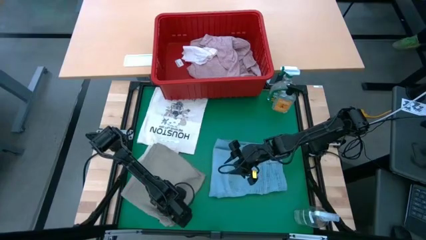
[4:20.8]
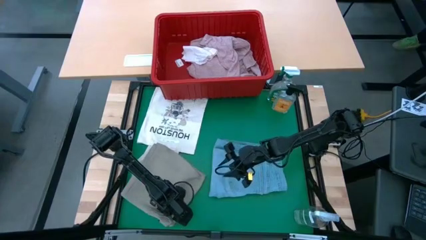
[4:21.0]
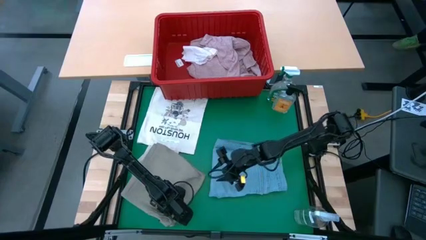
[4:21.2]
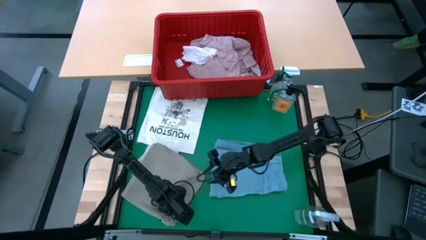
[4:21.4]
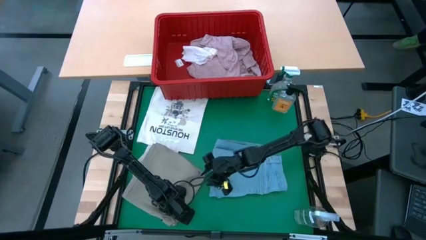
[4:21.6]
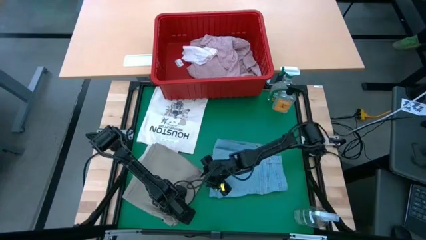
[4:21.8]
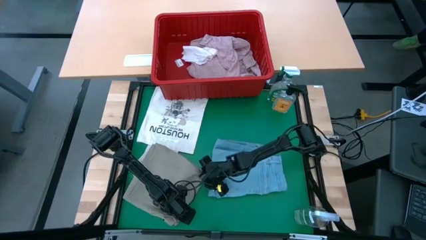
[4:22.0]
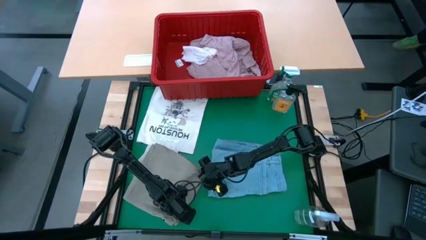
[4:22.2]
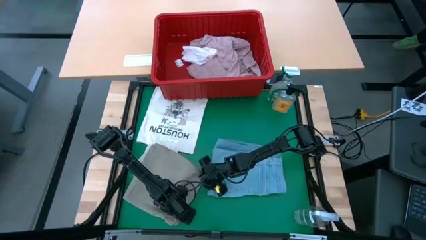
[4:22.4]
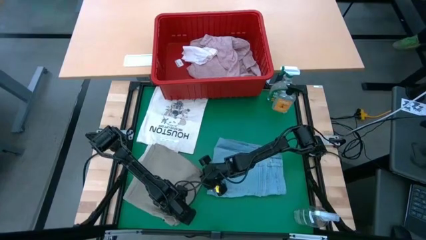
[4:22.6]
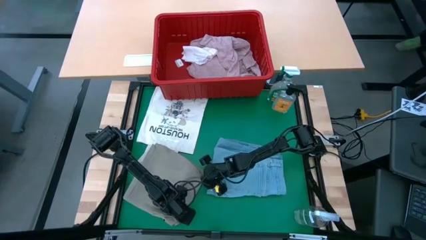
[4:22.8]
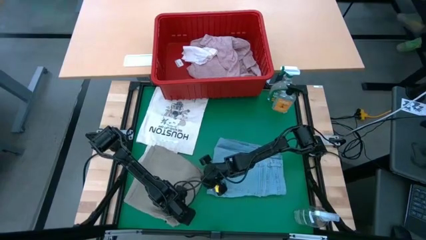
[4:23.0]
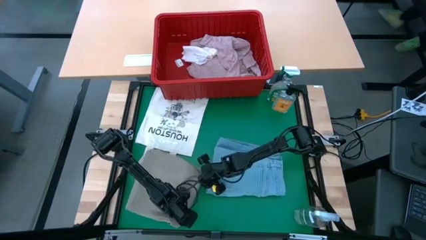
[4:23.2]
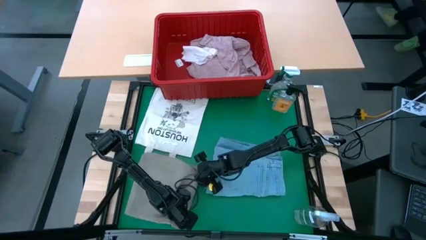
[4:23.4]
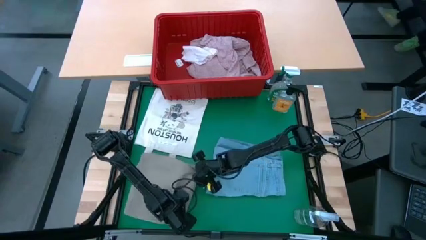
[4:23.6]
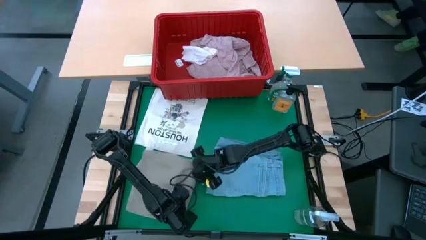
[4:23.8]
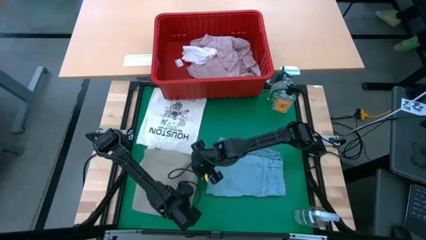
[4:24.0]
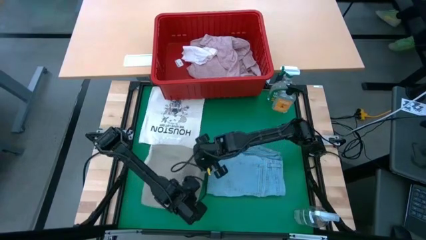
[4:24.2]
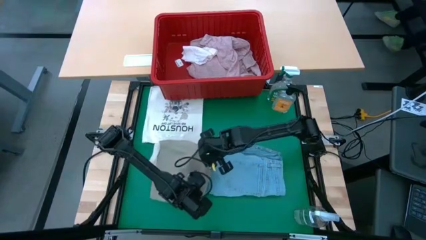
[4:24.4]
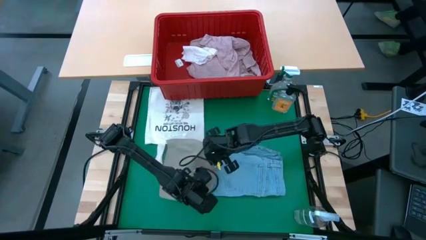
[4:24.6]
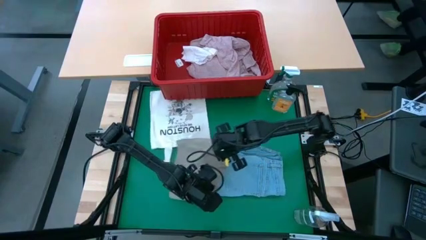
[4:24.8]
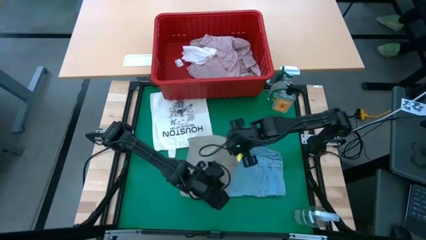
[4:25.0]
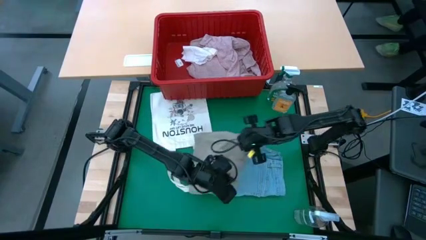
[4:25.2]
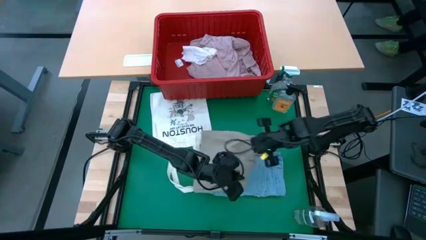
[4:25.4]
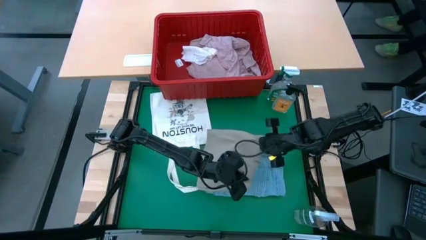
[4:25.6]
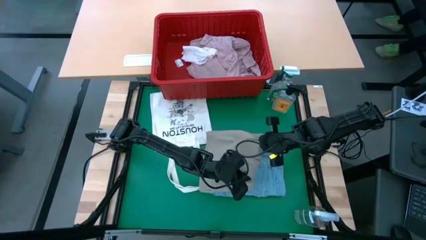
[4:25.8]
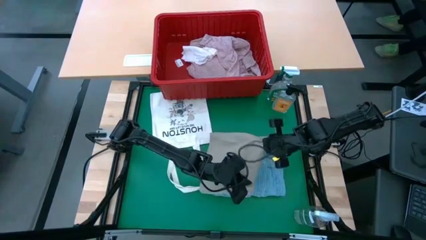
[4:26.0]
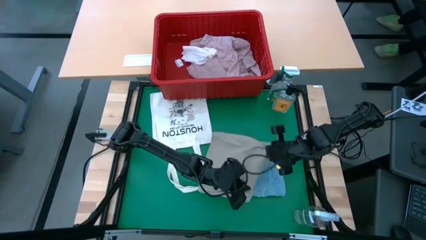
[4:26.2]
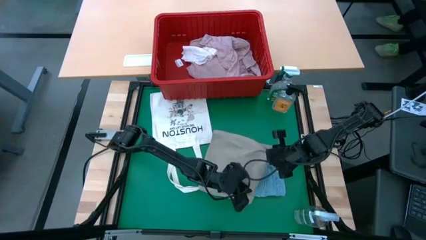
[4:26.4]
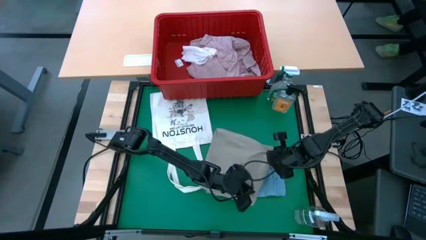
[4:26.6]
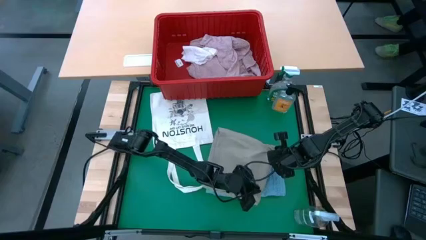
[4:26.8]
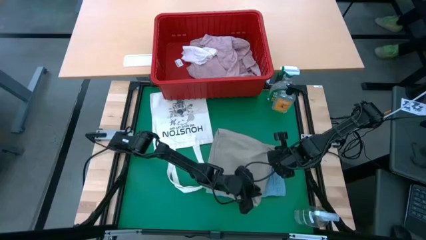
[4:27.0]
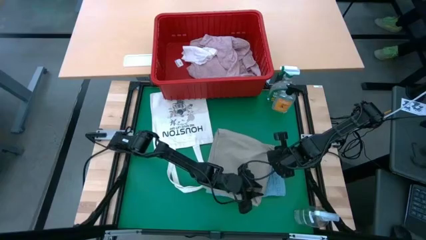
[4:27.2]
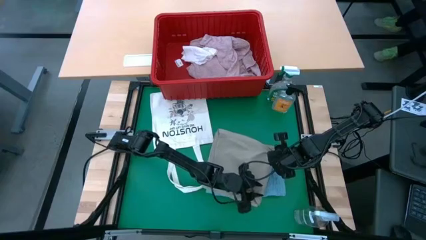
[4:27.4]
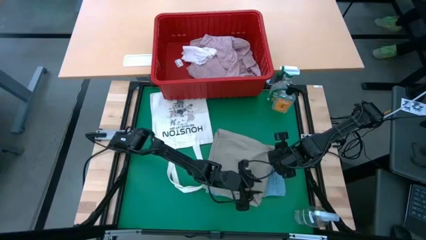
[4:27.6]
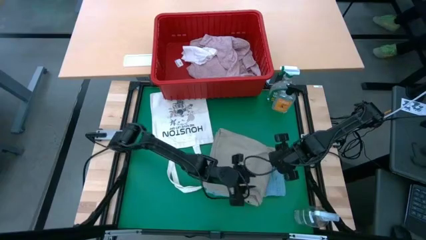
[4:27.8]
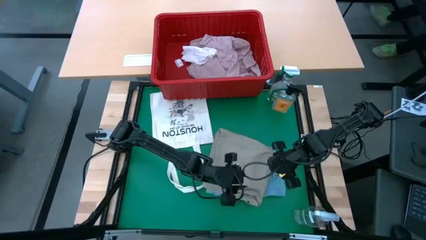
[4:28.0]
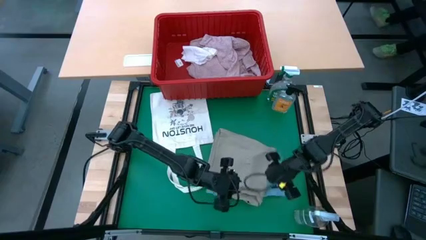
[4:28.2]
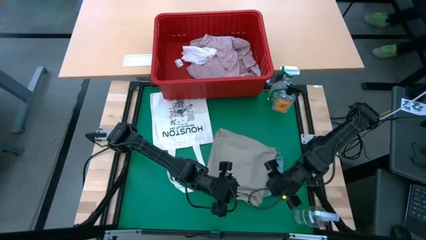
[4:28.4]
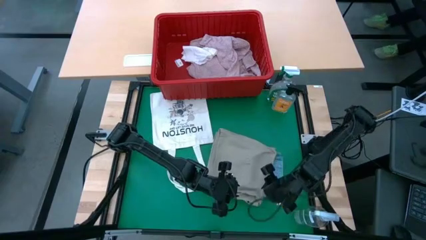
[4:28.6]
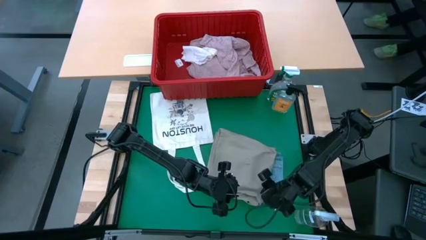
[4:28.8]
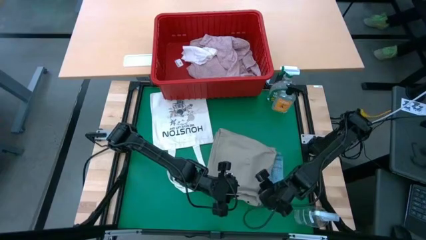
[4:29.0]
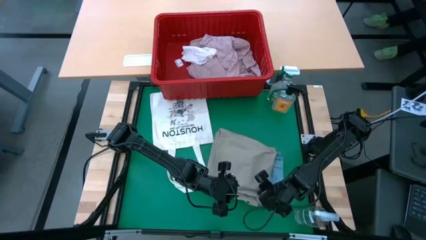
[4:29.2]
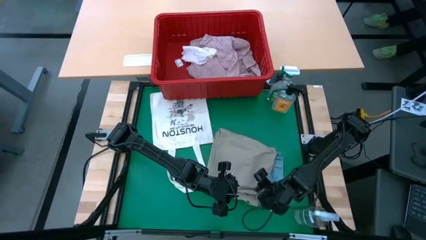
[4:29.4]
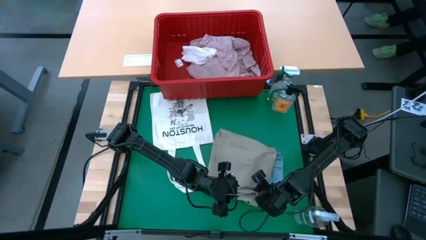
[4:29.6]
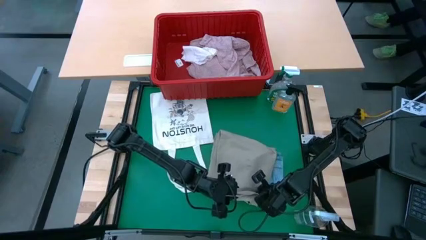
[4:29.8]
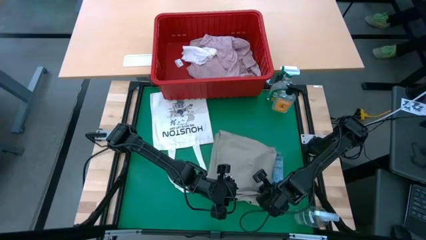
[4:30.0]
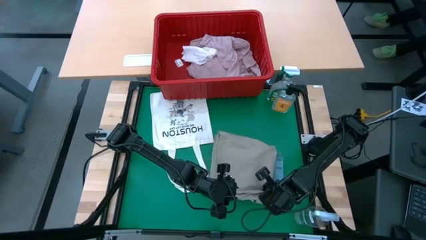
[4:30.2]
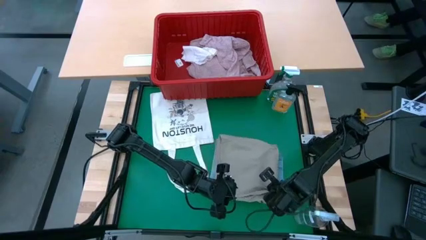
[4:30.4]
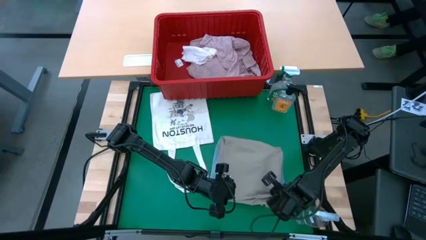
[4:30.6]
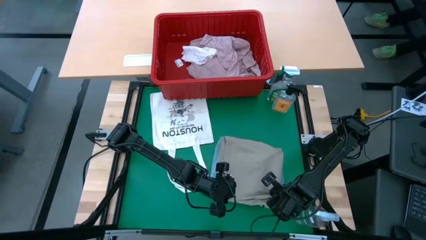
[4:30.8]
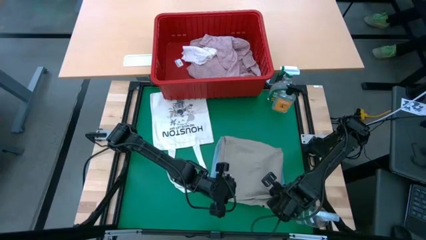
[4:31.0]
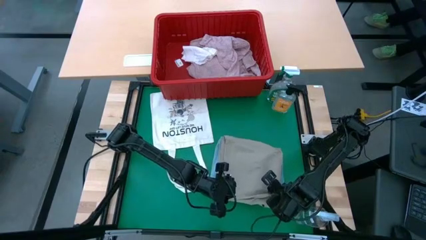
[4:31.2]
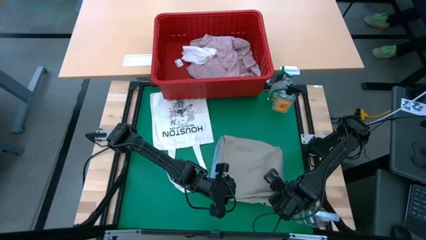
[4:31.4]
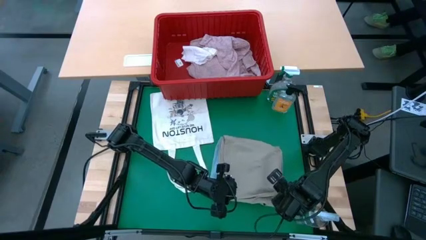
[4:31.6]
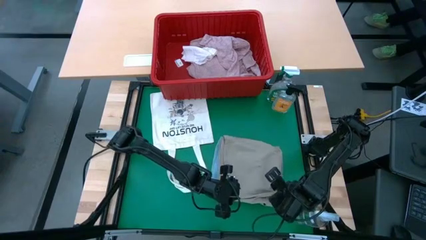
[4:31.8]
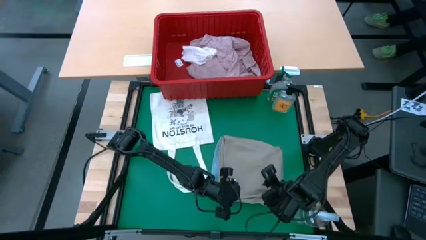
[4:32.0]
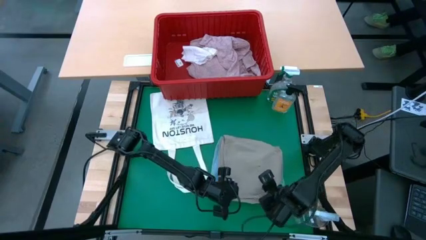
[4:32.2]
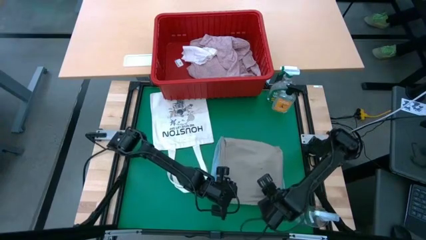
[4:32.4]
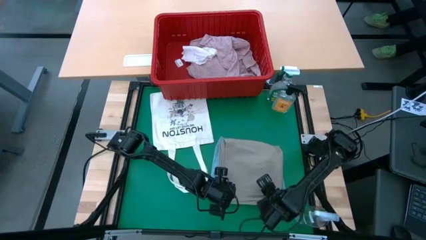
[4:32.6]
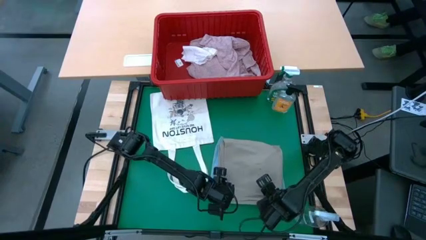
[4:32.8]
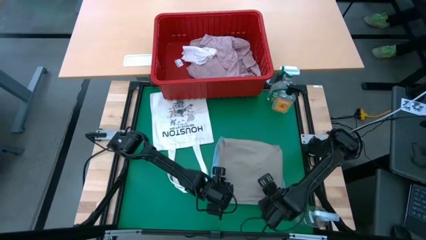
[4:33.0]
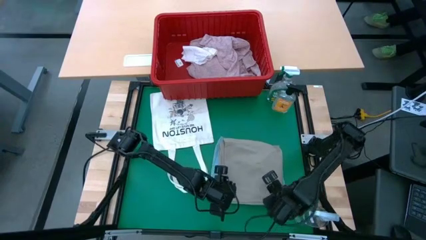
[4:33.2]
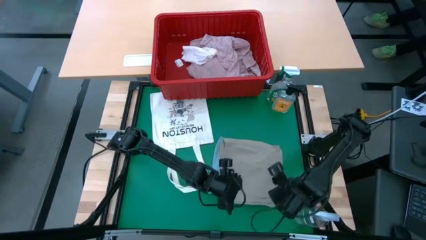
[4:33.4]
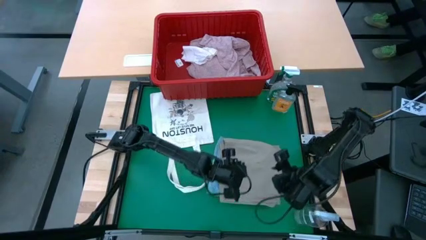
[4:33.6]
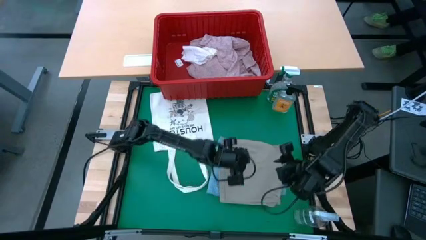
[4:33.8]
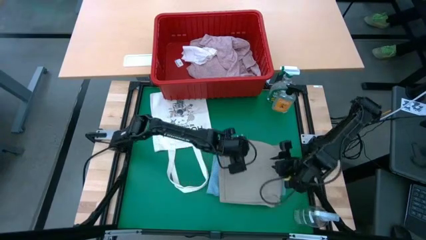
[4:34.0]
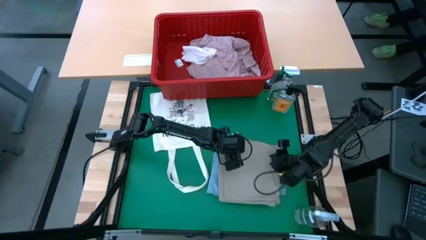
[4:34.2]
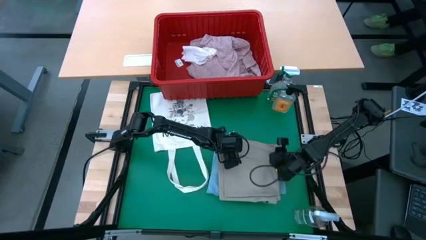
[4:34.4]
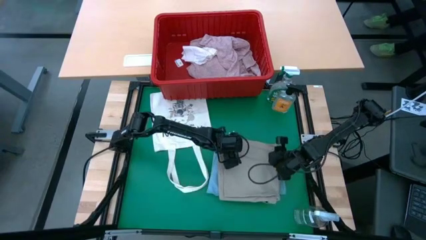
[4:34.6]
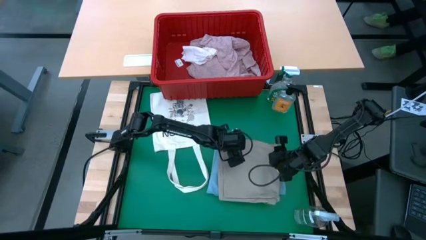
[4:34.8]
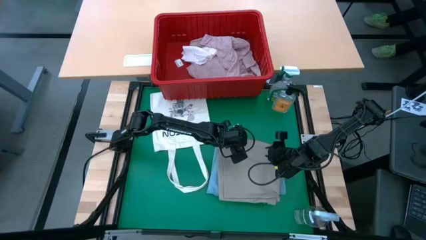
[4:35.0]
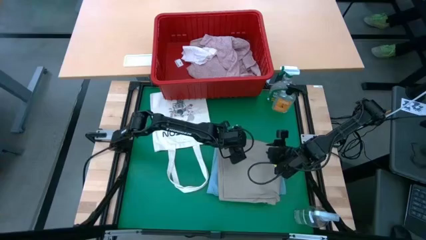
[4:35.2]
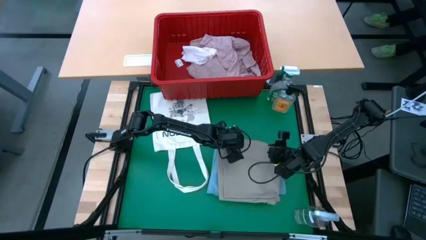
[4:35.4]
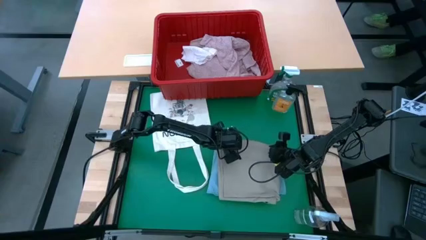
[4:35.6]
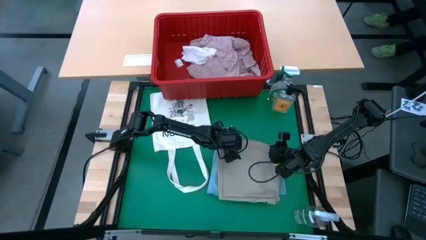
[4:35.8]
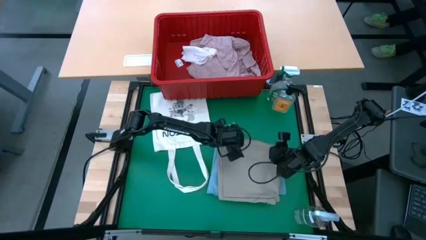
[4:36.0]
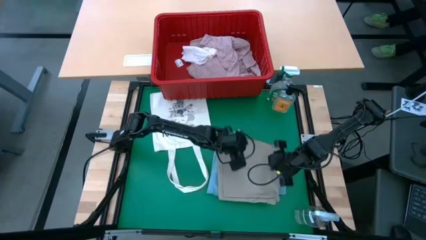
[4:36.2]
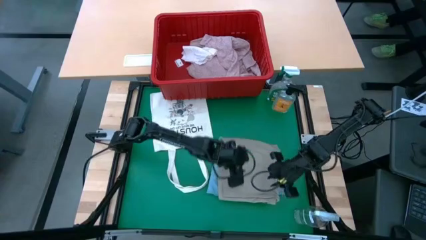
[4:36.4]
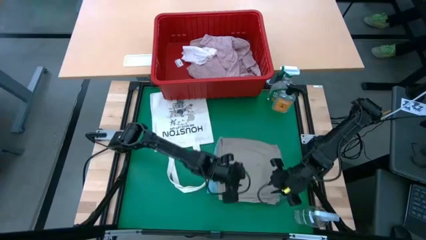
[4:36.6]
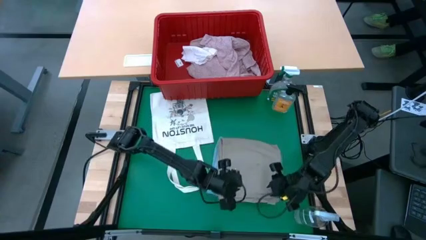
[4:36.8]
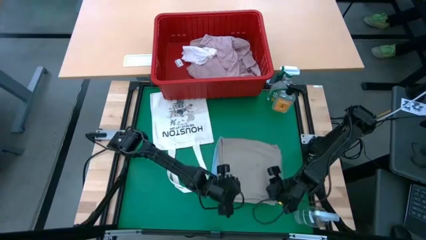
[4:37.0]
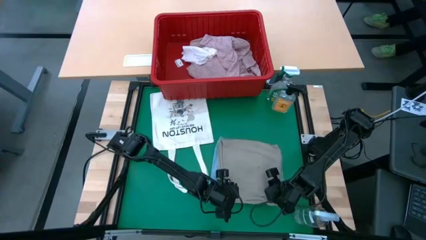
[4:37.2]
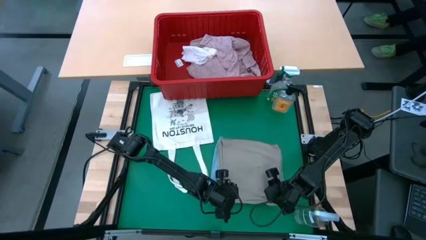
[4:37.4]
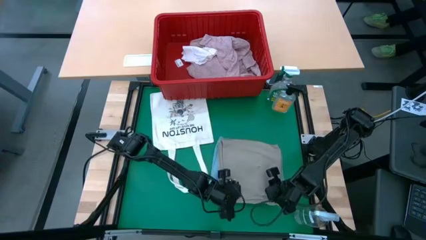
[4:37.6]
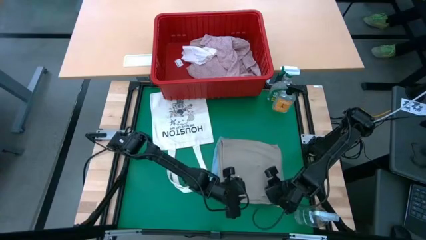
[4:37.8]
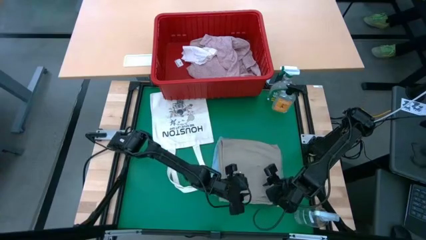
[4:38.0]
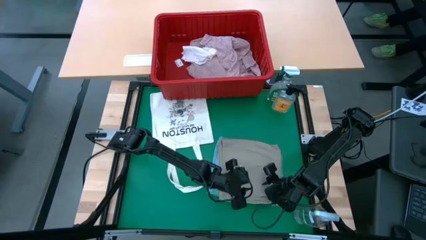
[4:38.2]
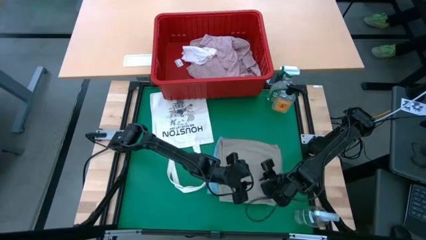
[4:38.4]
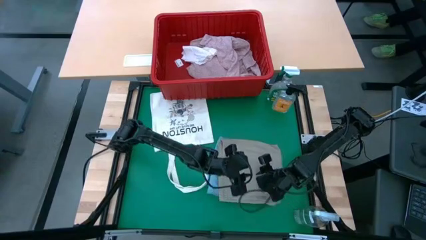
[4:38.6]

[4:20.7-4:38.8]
Task: Fold laundry
Stack the folded gray shorts on top of the folded light blue pants
